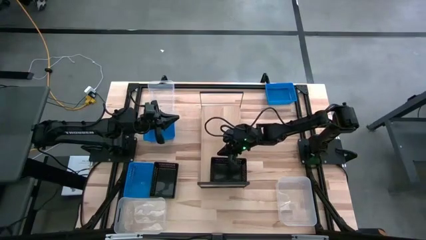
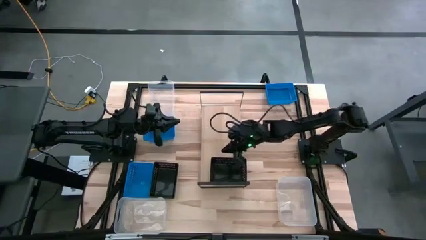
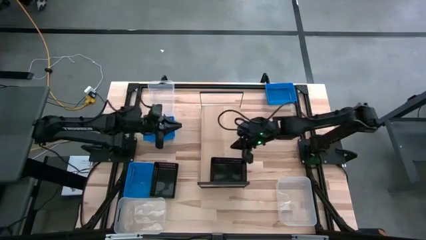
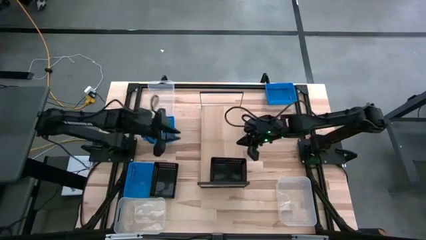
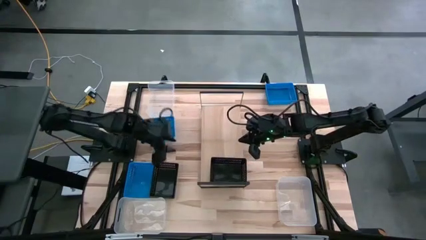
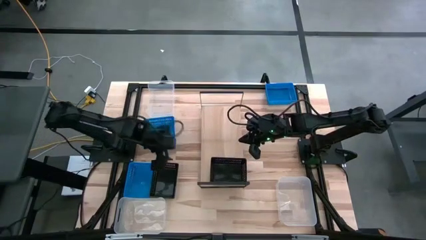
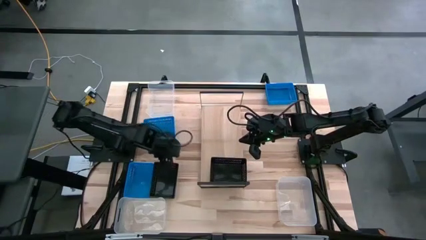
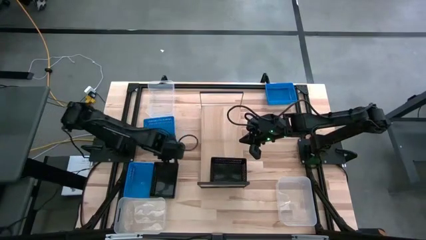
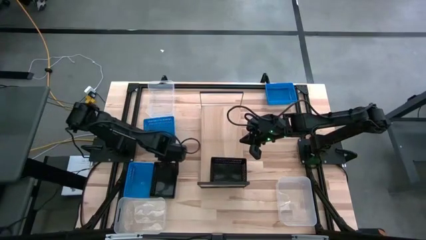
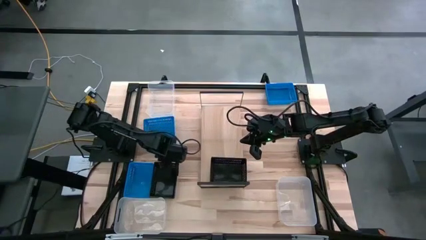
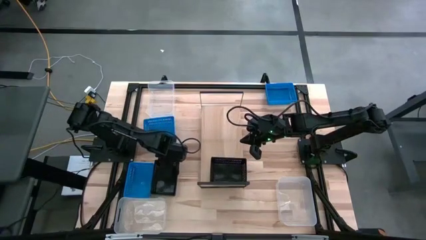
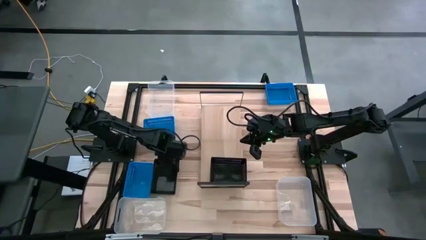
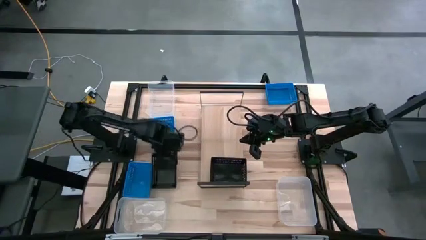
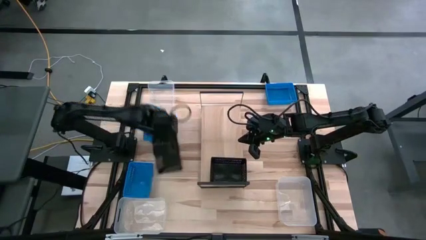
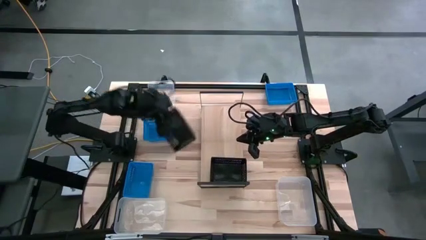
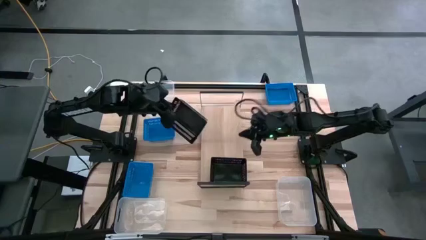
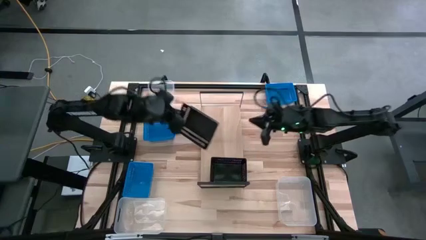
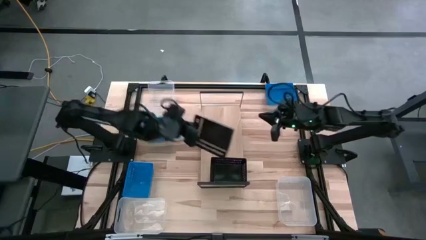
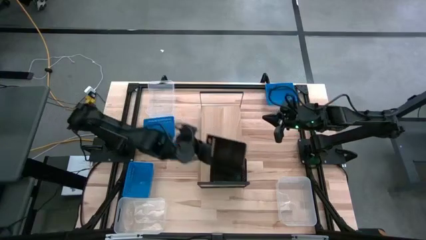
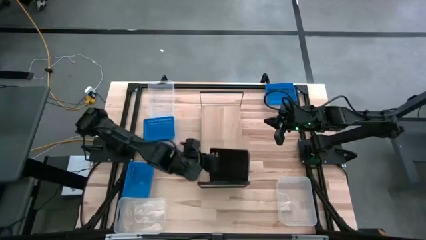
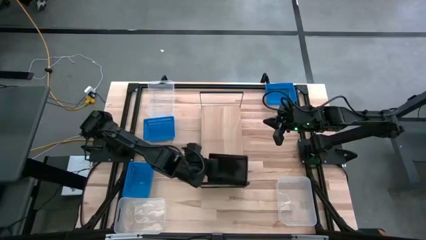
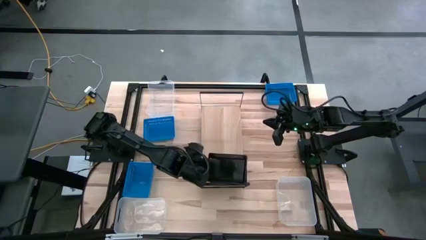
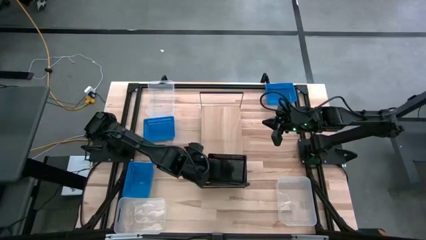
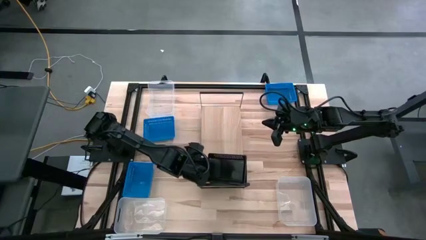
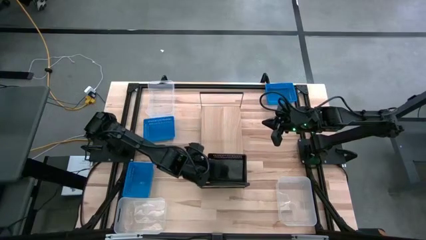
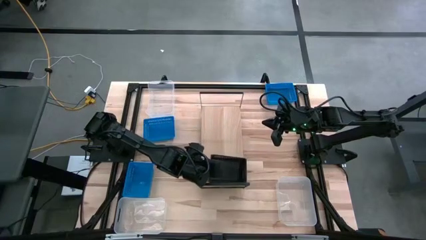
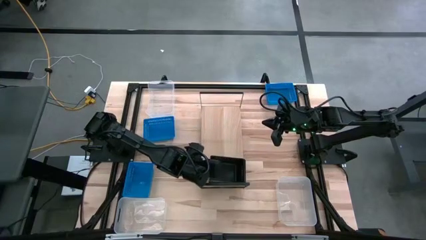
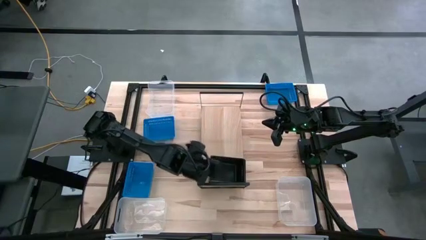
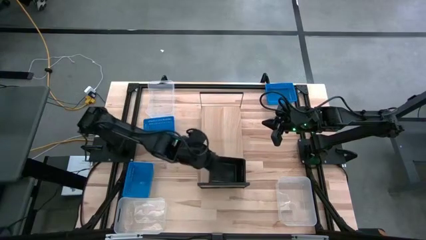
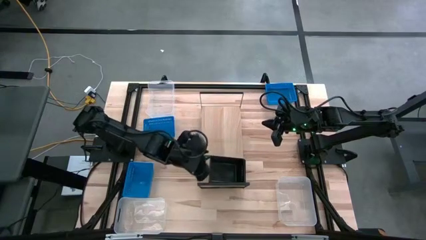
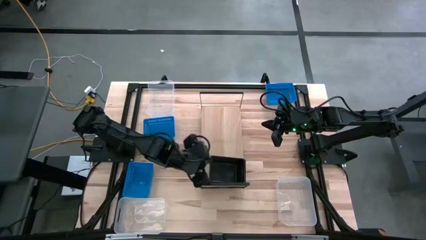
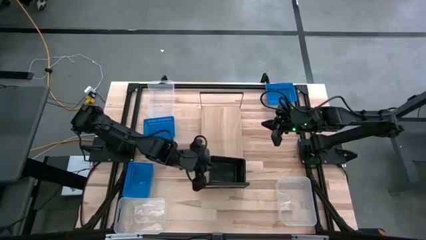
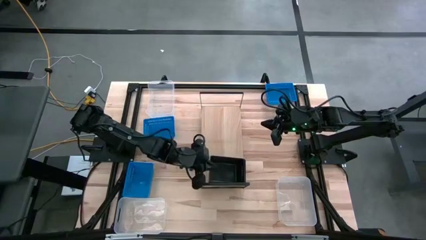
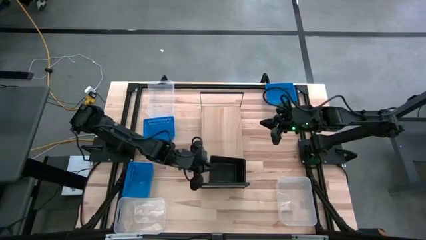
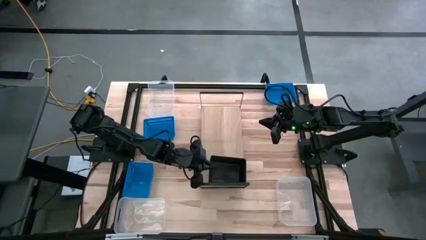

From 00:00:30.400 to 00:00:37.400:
Task: Stack baskets on shelf by color
Stack the black bin on top of the other black bin on the shelf

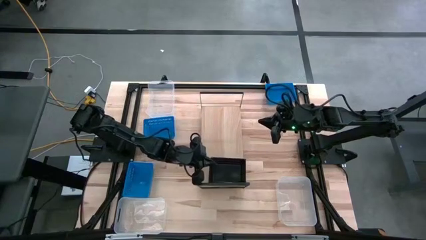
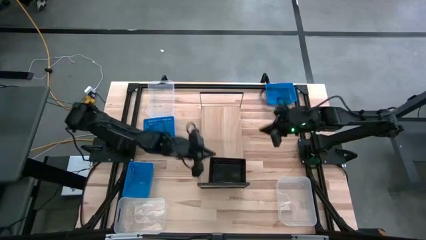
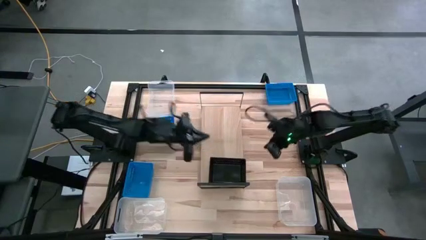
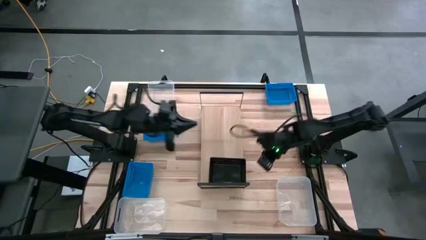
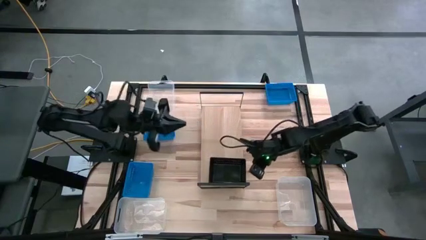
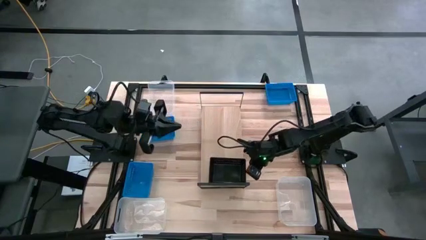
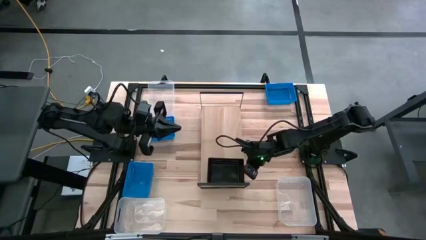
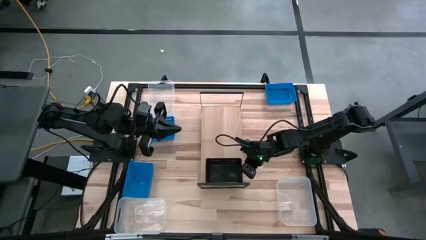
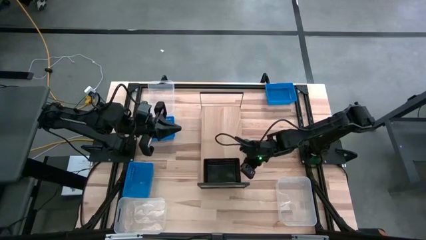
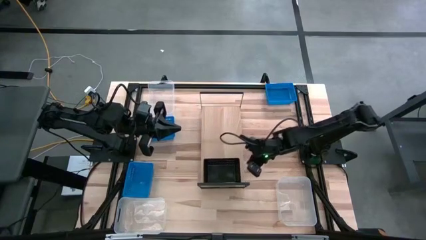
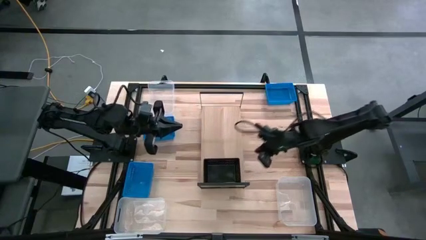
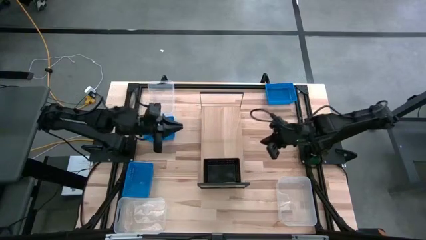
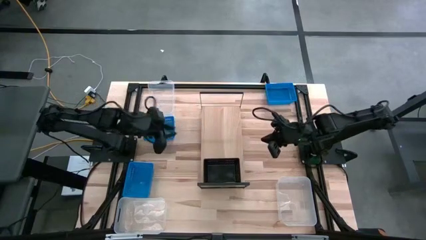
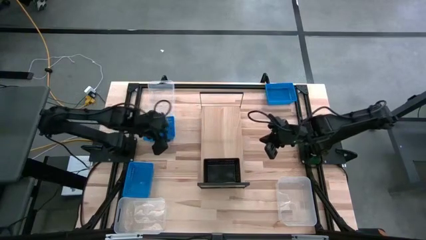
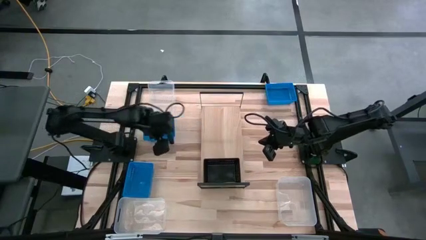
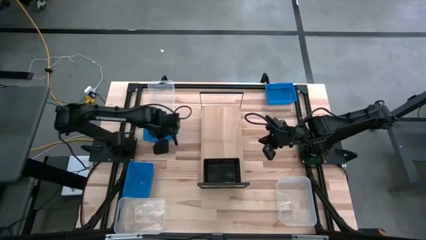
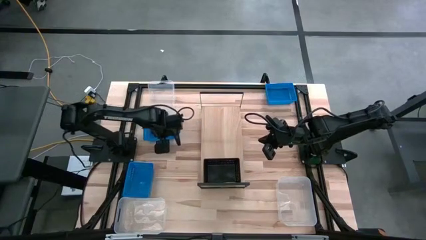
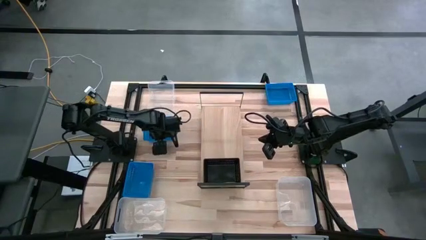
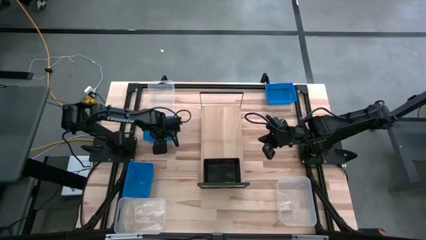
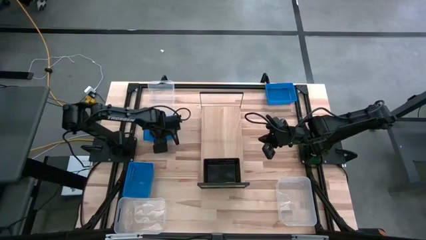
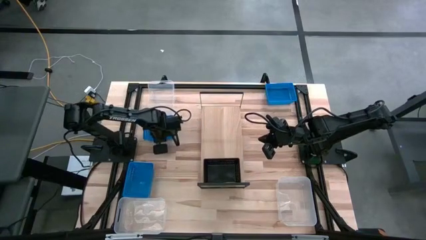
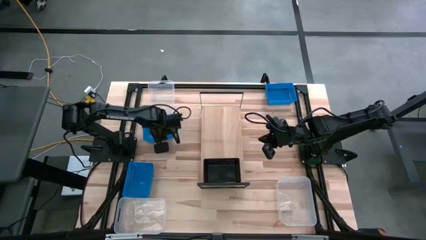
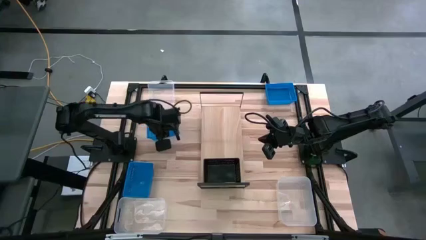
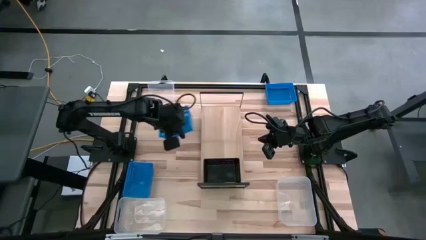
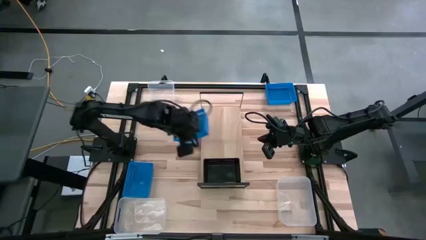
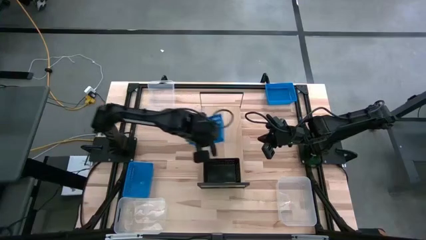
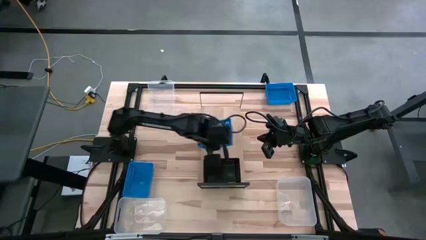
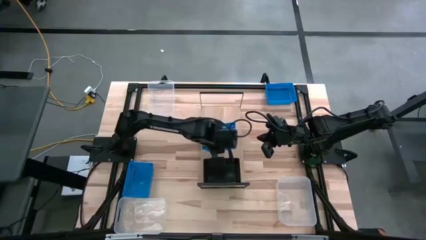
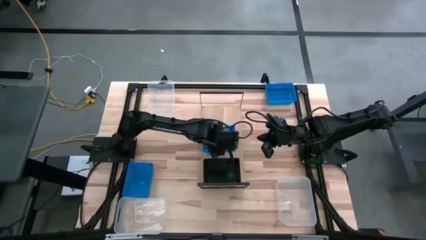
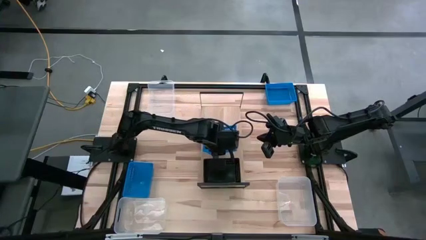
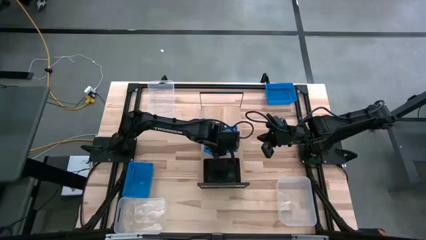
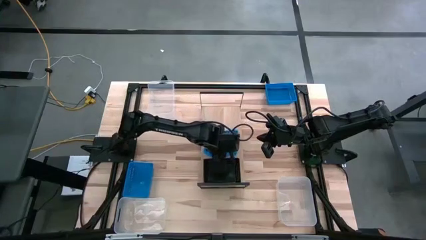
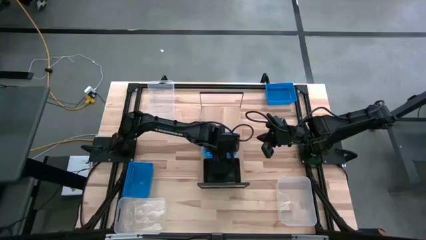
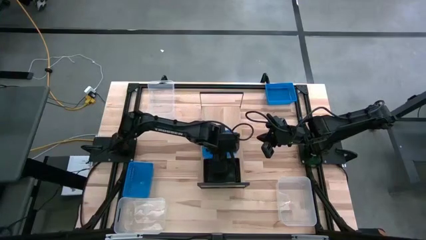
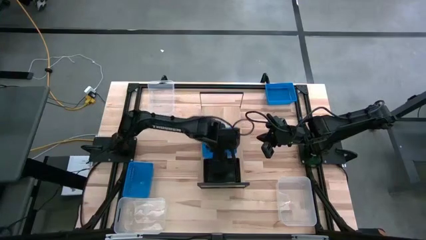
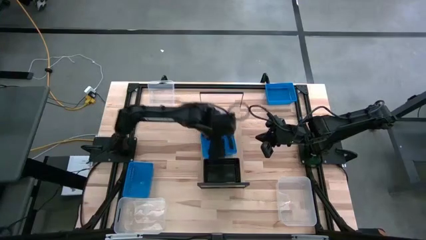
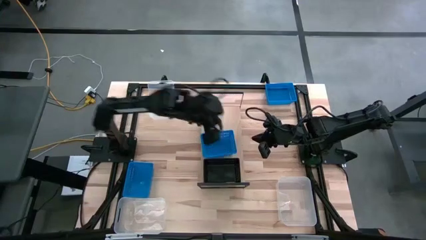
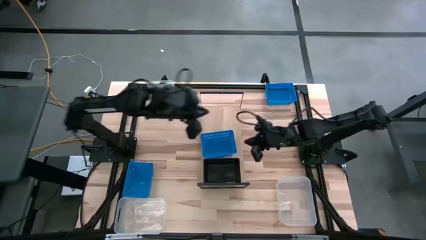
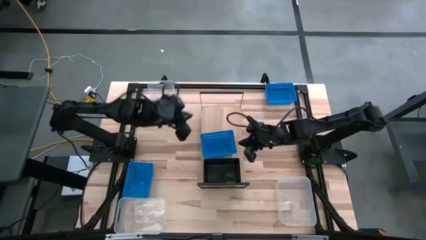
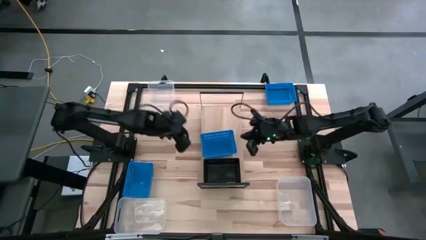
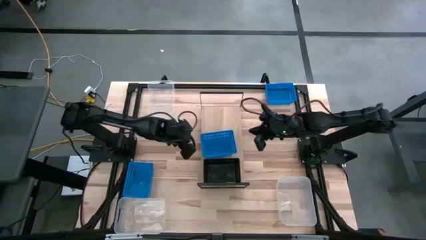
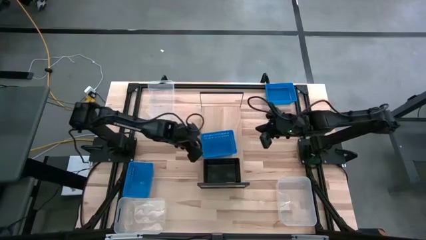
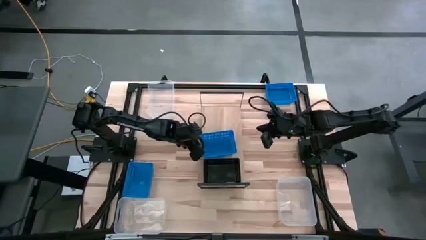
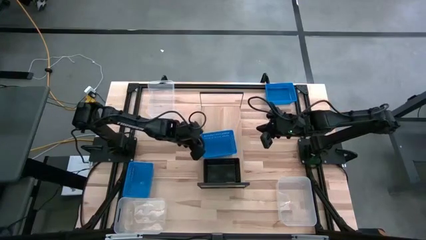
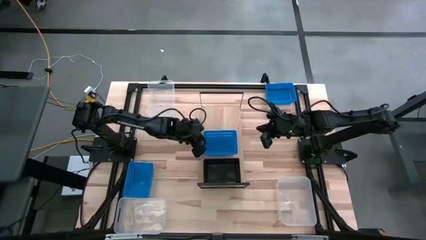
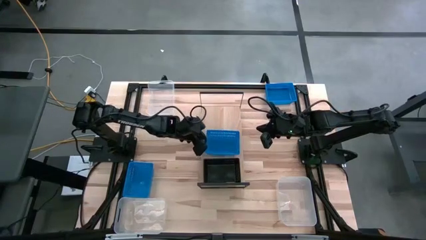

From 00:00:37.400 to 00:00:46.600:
Put the middle blue bin on the shelf
